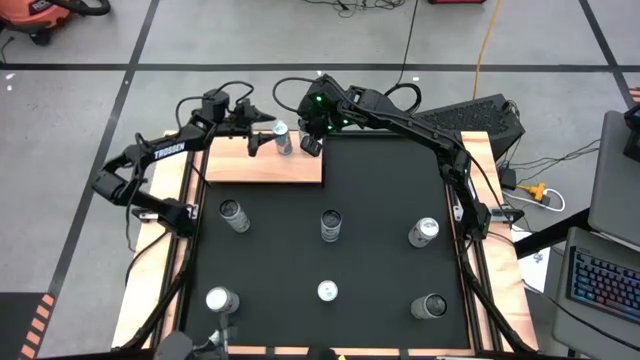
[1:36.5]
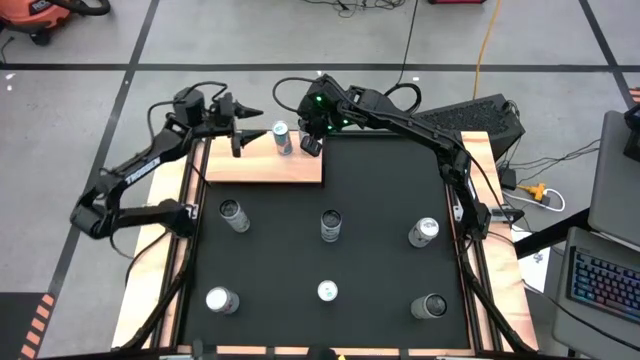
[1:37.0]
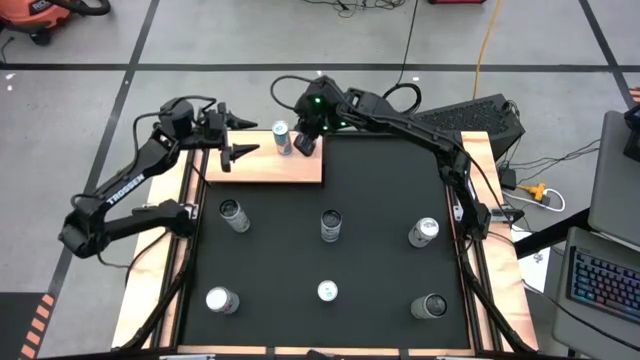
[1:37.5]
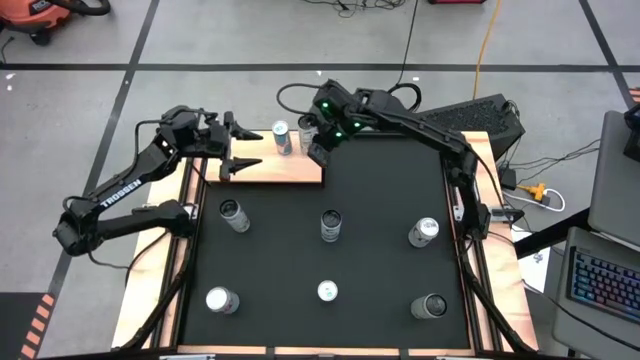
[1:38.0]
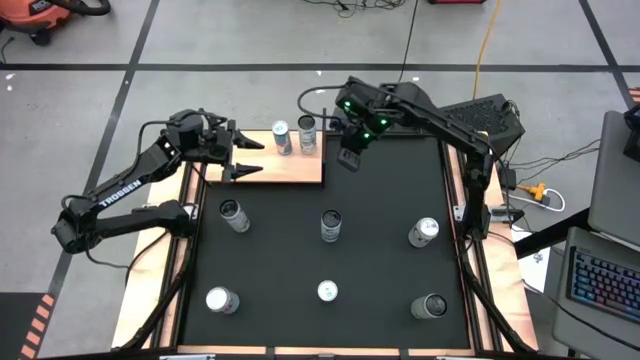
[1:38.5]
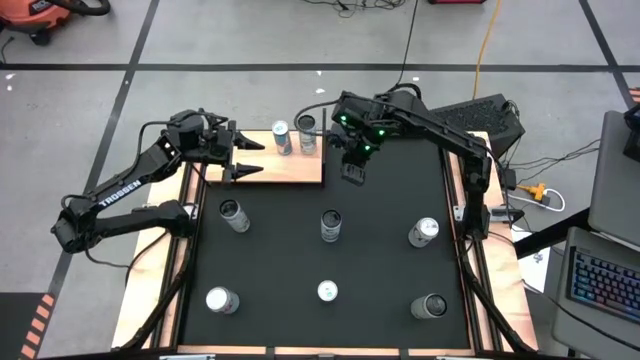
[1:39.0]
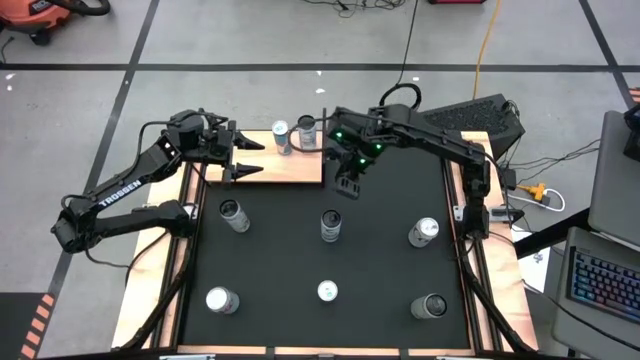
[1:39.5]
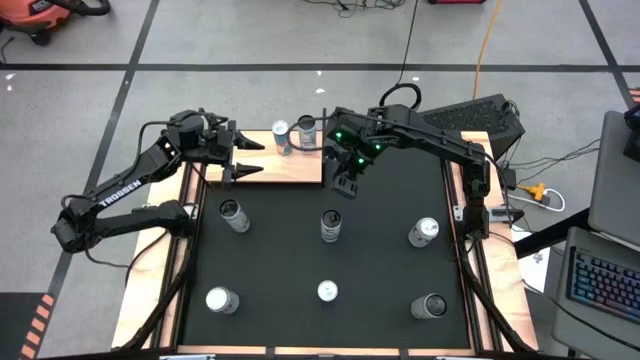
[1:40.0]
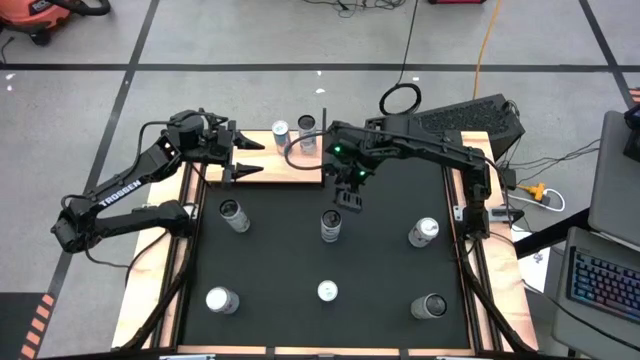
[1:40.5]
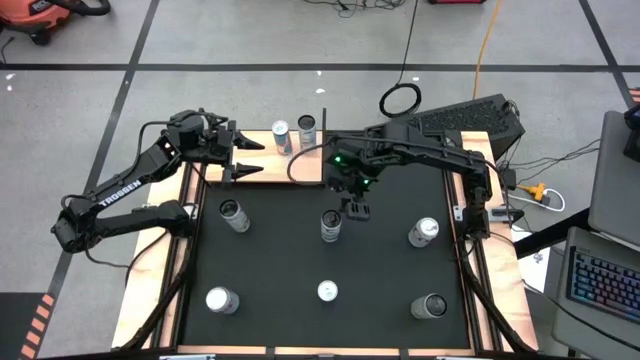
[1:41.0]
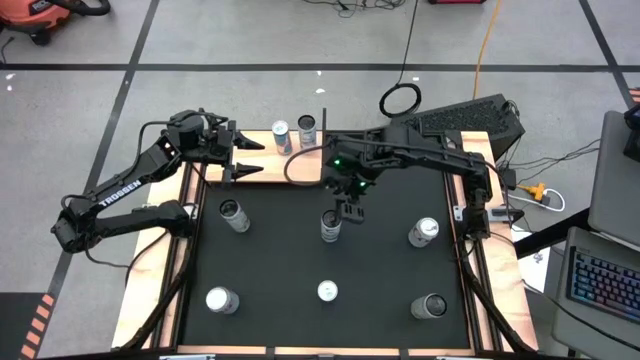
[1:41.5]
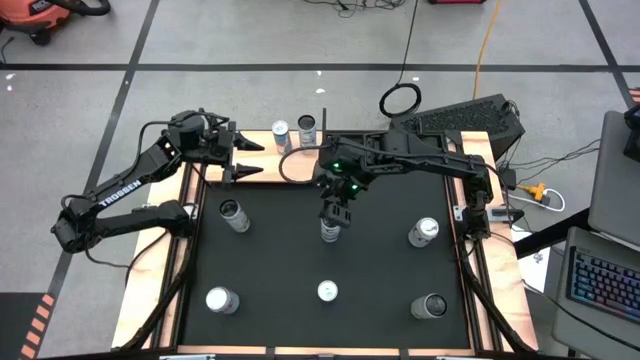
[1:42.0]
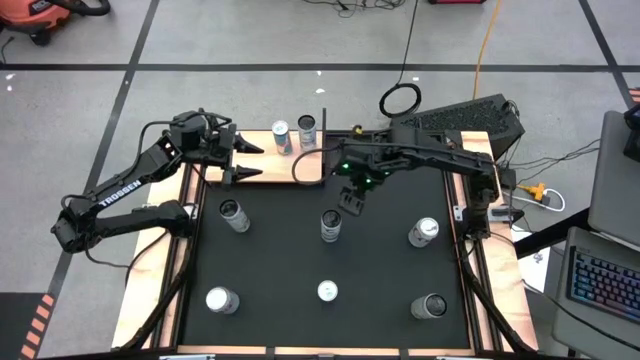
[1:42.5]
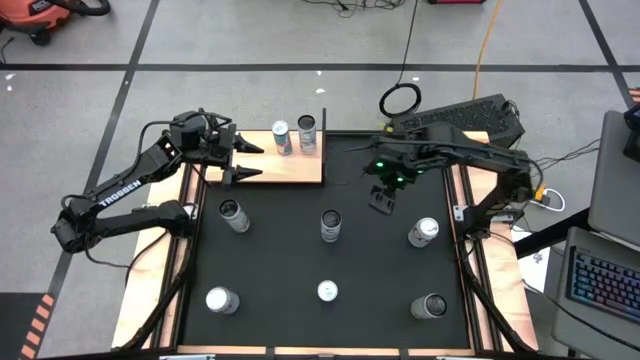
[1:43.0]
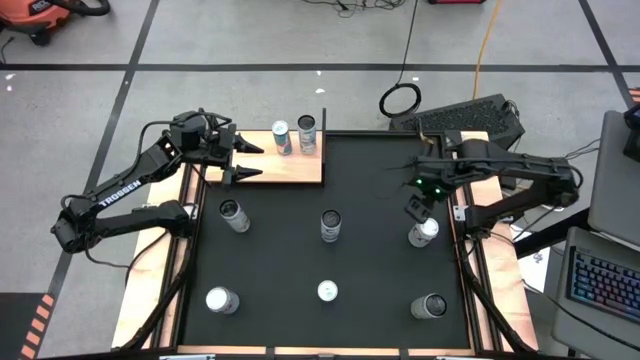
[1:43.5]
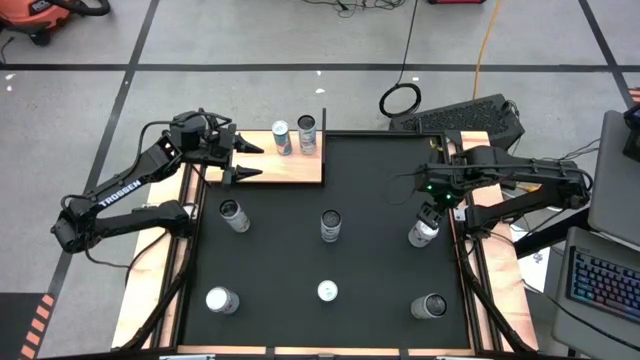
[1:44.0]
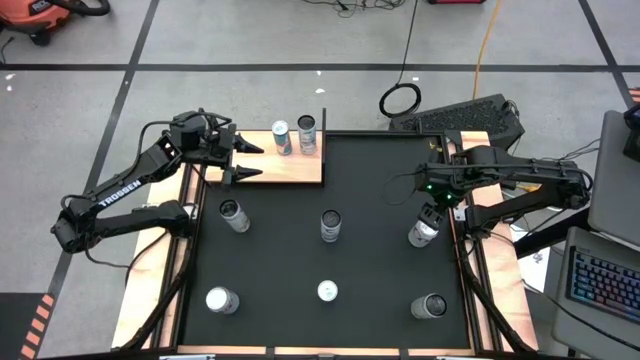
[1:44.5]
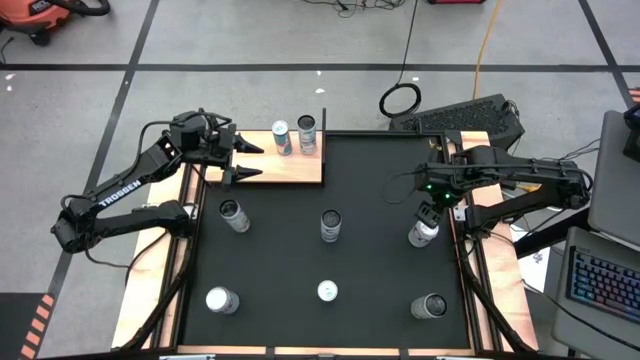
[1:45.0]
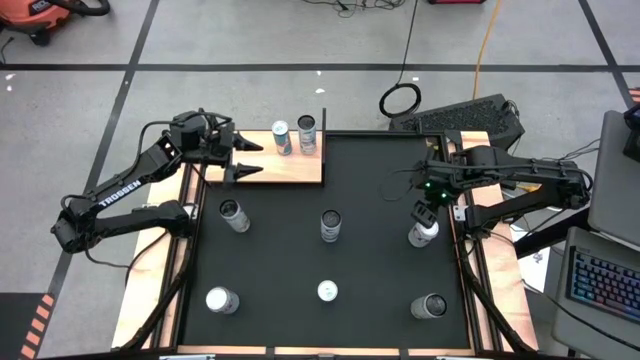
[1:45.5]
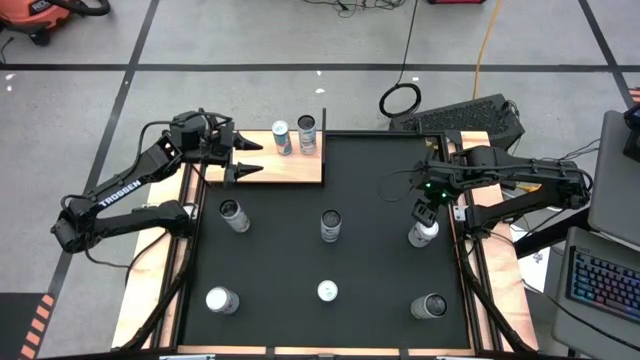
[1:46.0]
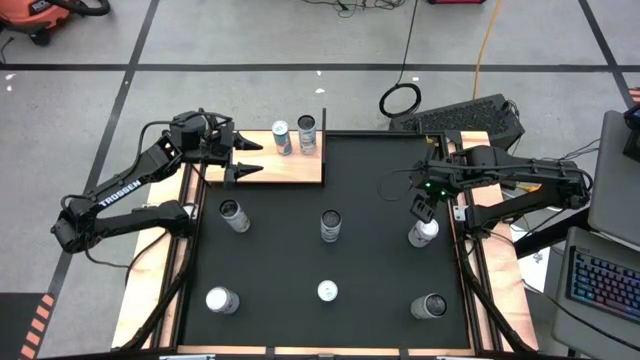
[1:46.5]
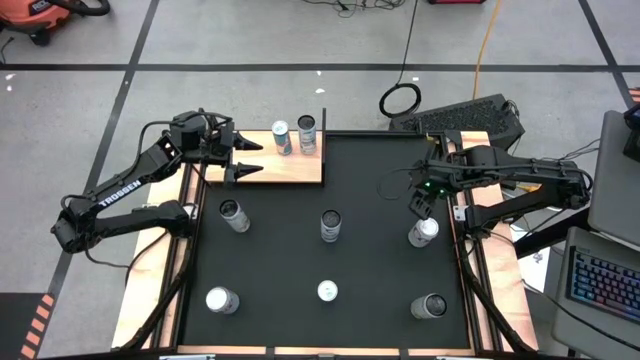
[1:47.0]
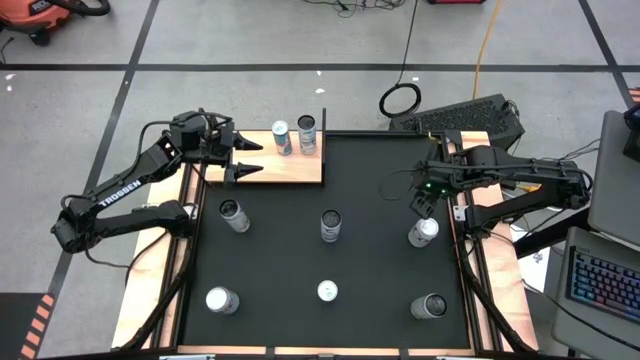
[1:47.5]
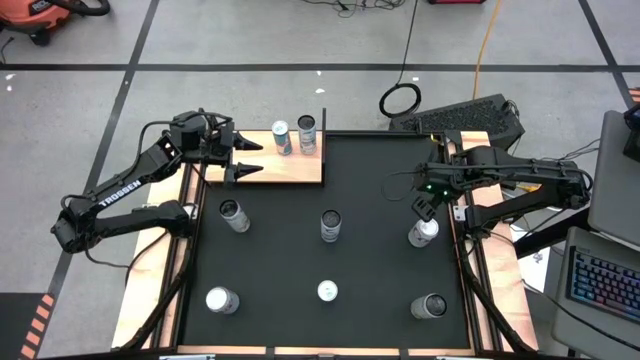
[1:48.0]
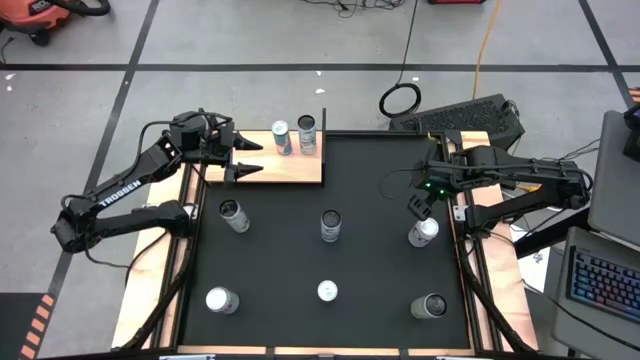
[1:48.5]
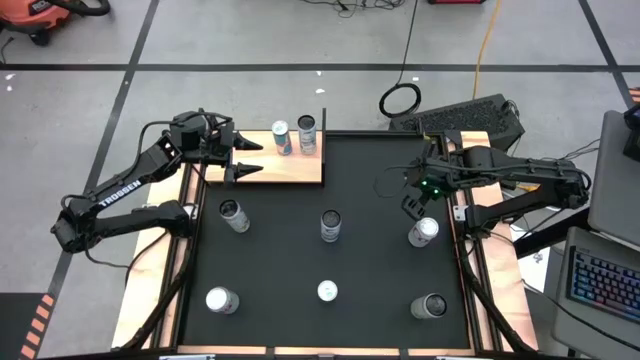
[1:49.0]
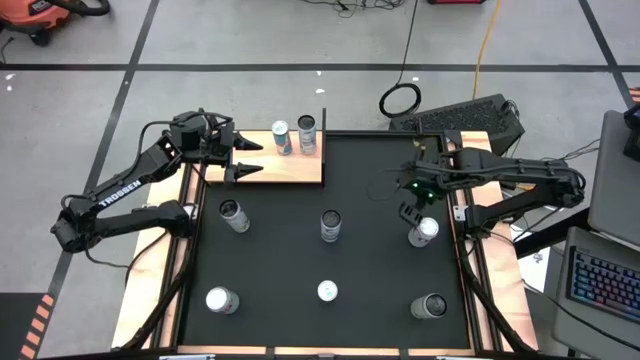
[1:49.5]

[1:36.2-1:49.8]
Task: Place canned beverage on shelf
Put the top red-silver soda can on the shelf

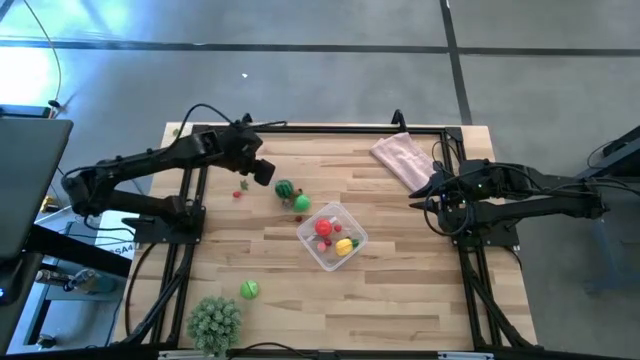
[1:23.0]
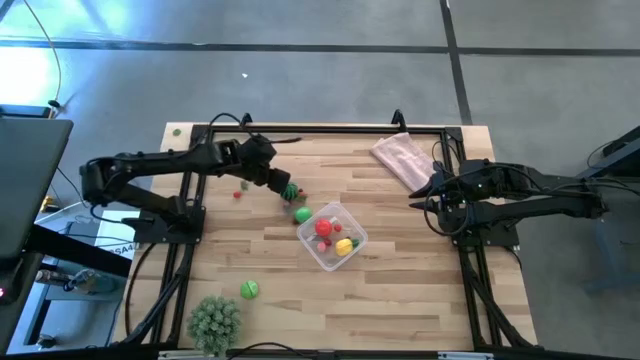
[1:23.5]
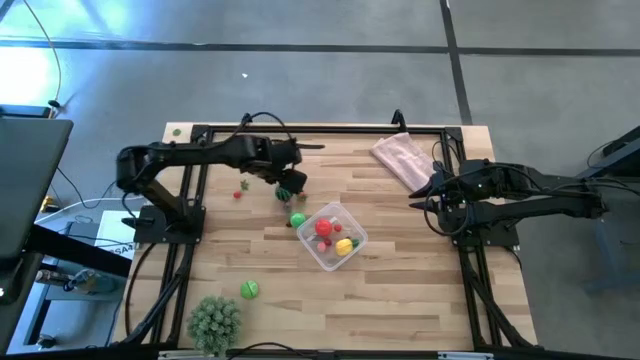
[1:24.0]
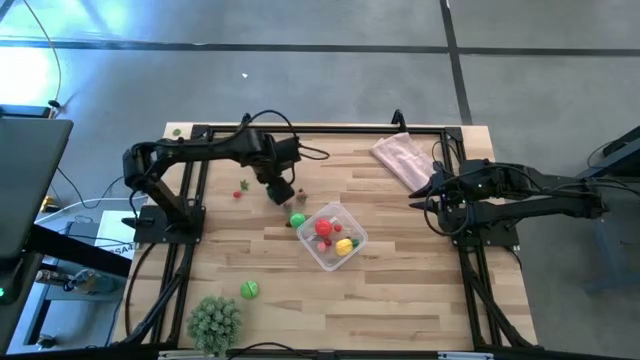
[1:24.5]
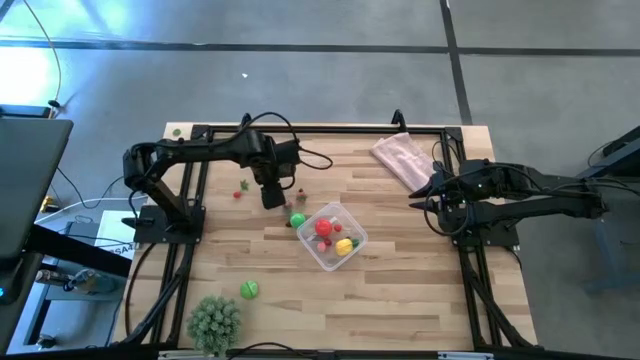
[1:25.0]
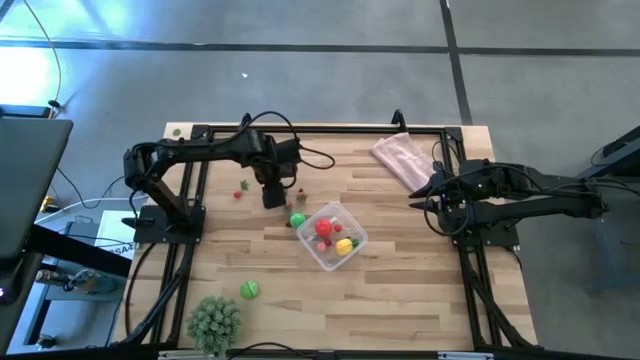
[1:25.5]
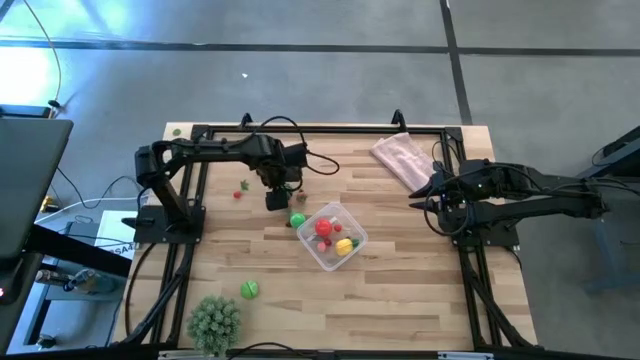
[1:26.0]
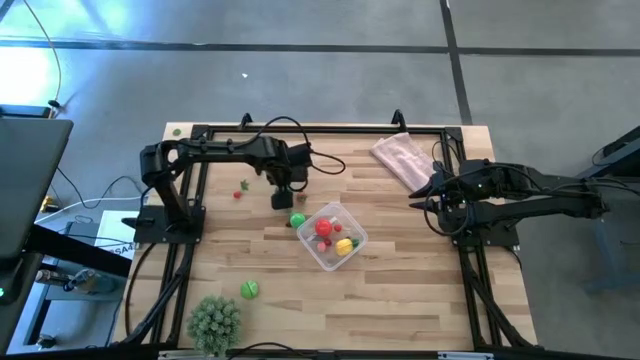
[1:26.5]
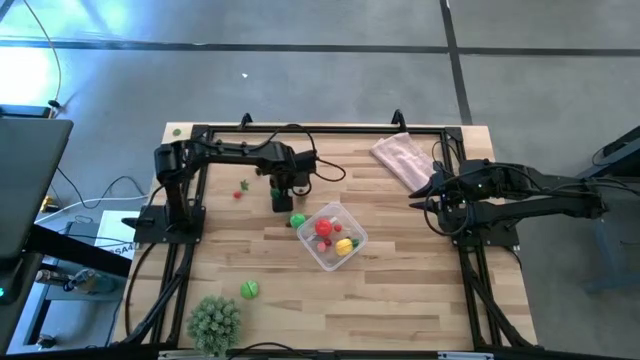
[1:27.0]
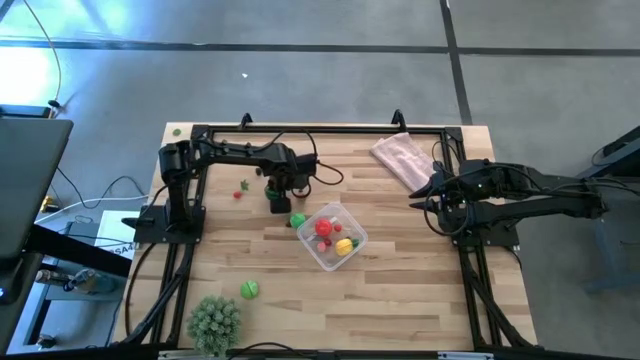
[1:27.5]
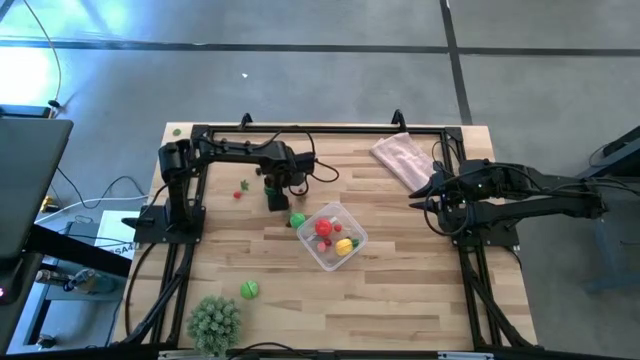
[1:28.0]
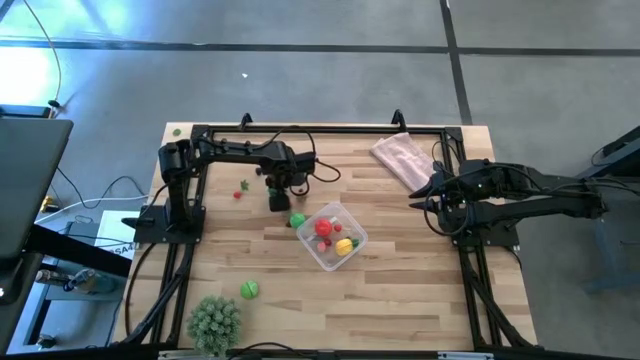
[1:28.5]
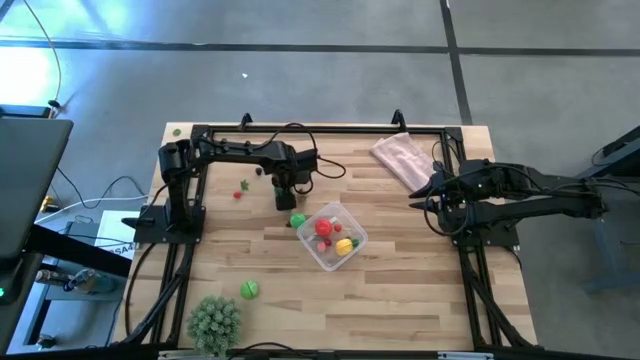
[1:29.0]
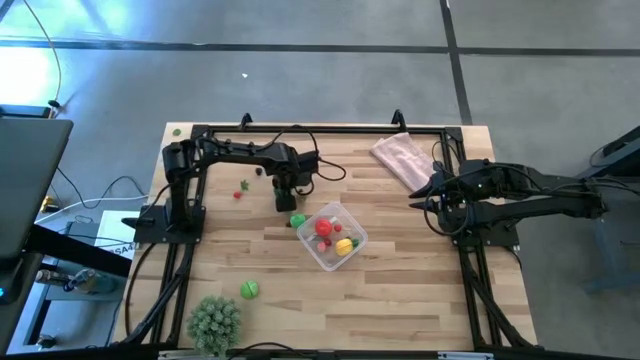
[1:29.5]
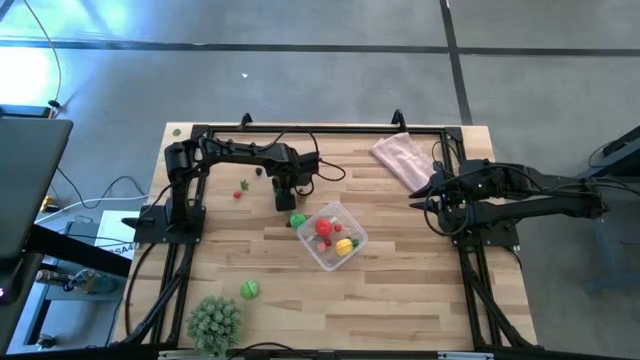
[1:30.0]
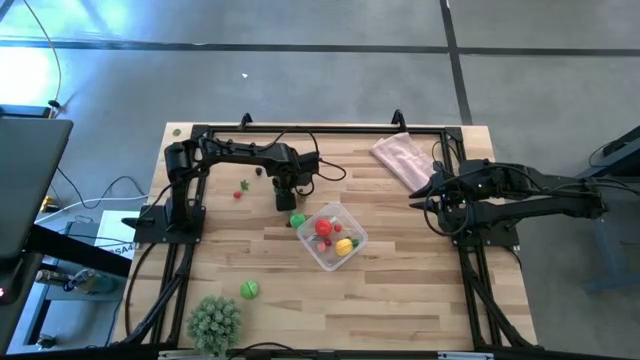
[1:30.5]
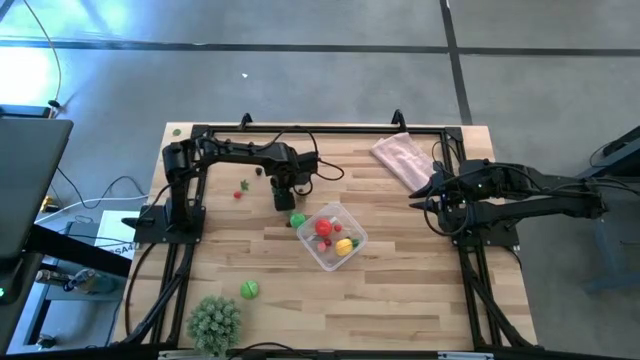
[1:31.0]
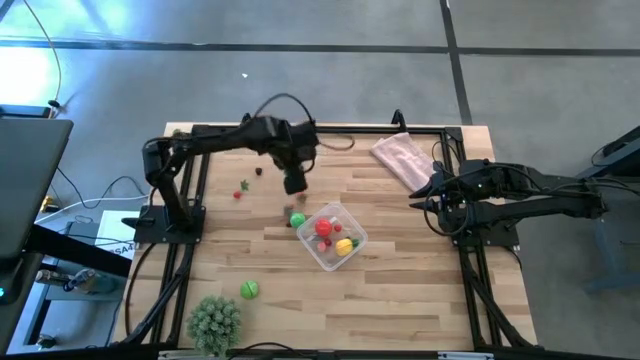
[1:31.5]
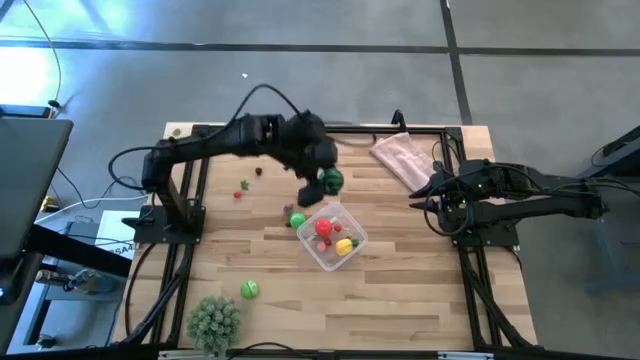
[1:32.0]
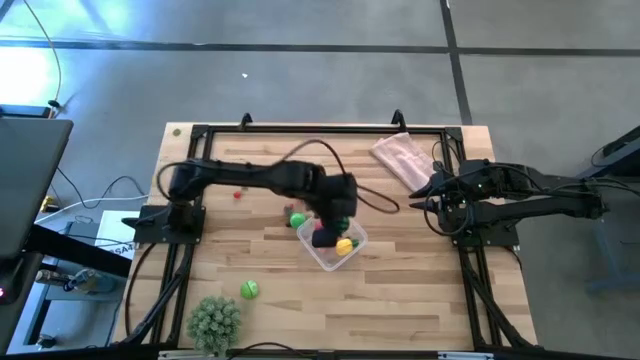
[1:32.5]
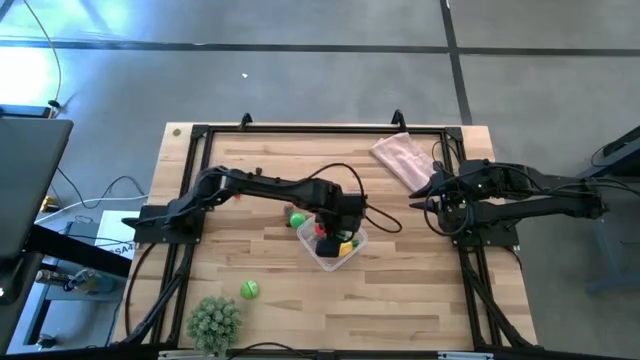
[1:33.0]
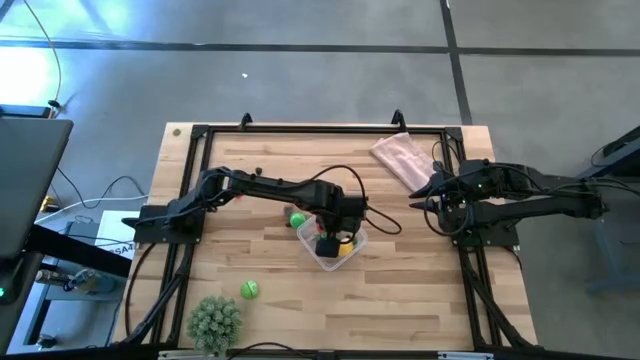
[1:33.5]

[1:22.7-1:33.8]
Task: Pick and placing Produce into tupperware
Put the green watermelon into the transparent container
